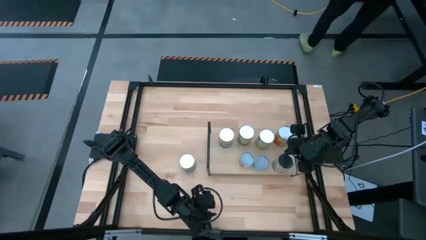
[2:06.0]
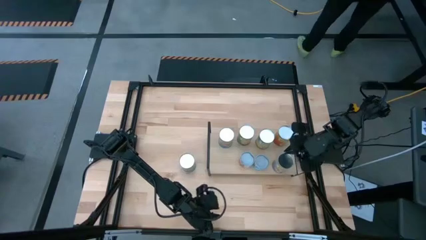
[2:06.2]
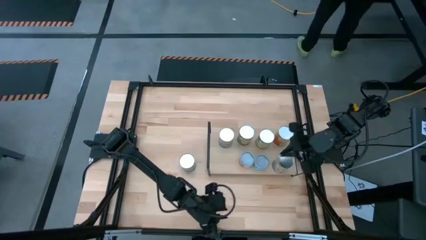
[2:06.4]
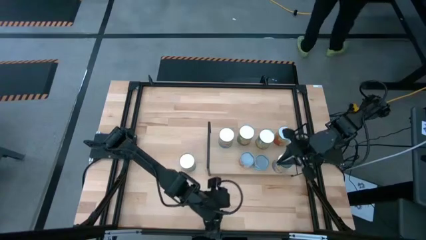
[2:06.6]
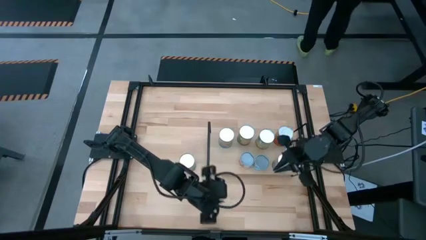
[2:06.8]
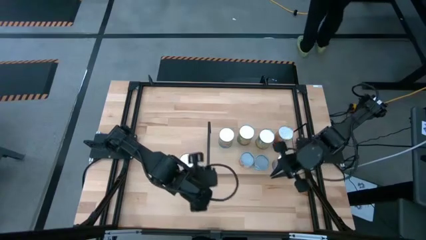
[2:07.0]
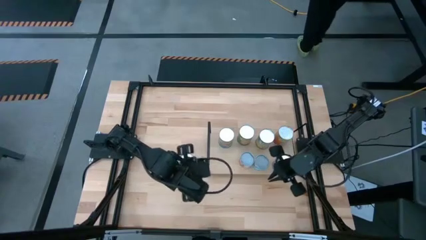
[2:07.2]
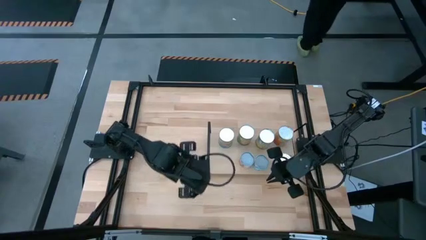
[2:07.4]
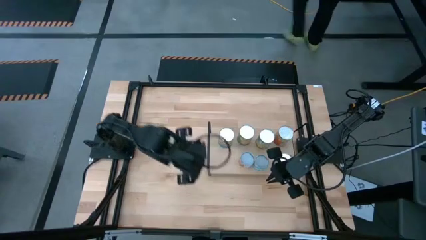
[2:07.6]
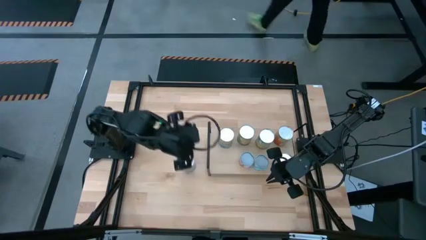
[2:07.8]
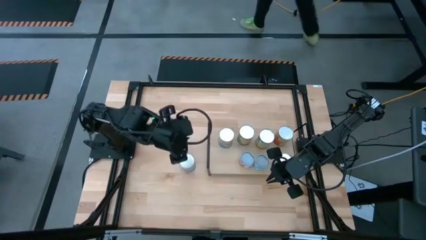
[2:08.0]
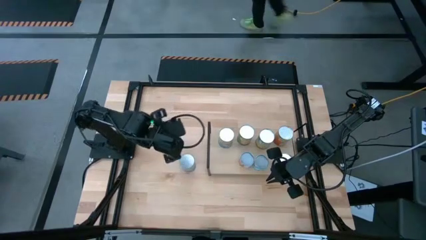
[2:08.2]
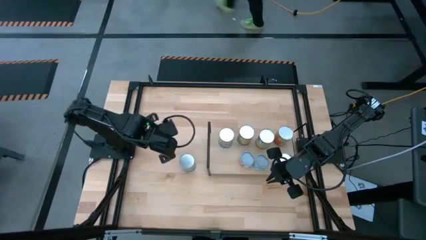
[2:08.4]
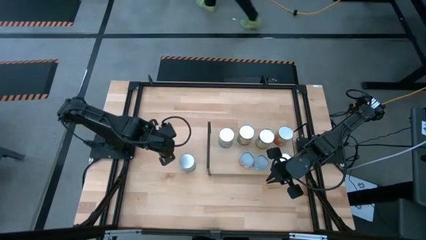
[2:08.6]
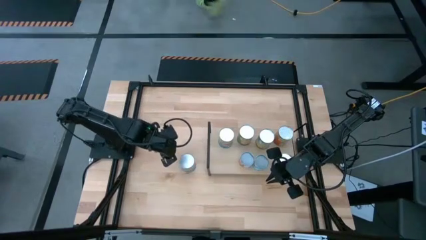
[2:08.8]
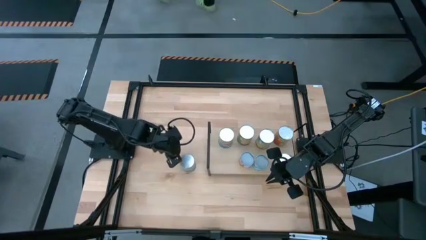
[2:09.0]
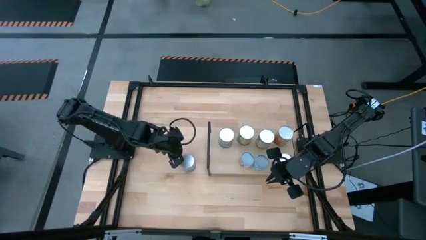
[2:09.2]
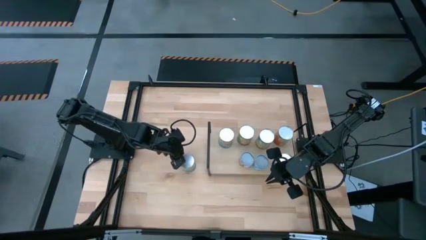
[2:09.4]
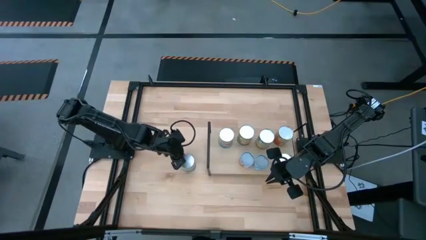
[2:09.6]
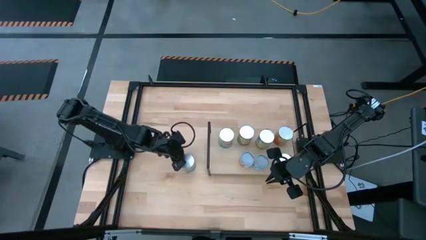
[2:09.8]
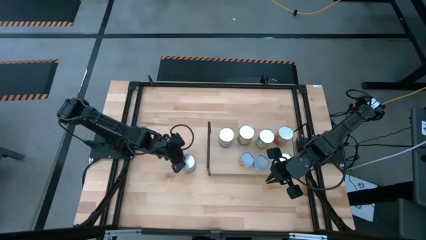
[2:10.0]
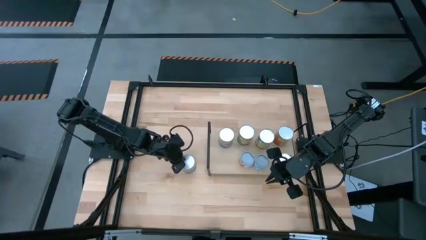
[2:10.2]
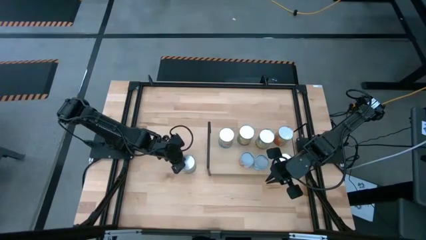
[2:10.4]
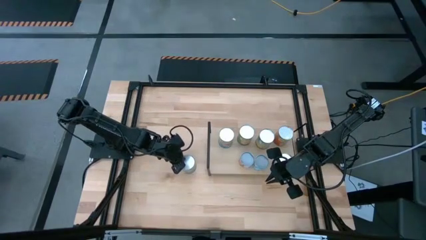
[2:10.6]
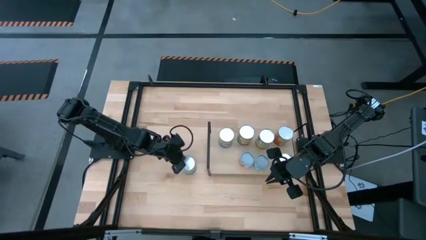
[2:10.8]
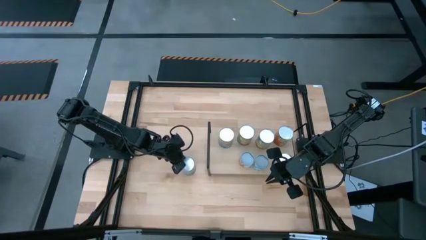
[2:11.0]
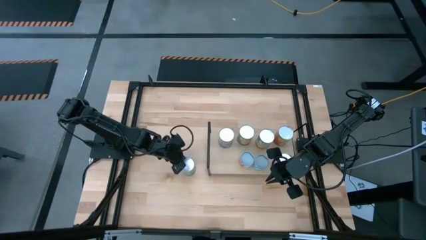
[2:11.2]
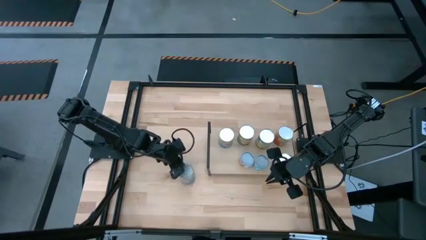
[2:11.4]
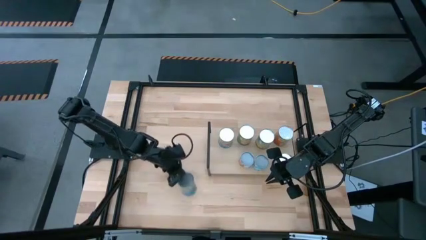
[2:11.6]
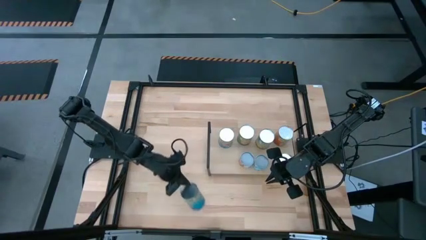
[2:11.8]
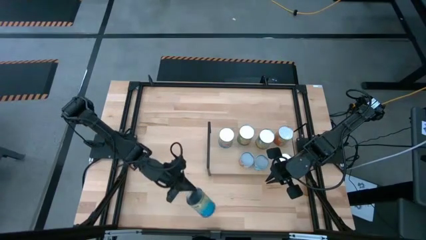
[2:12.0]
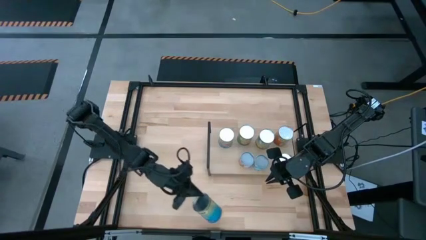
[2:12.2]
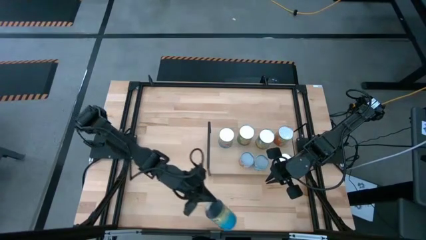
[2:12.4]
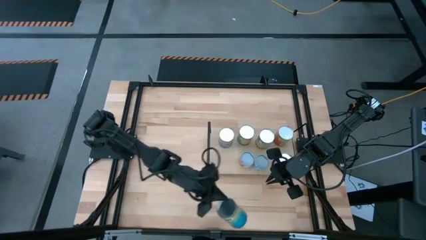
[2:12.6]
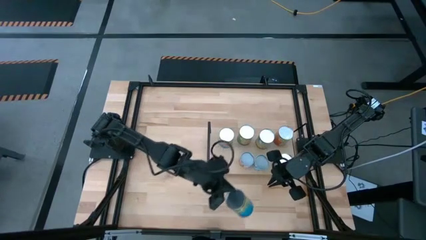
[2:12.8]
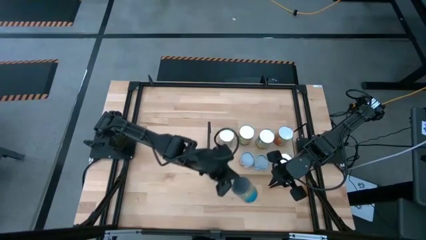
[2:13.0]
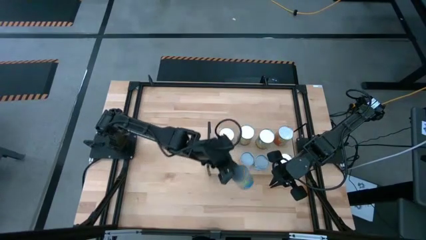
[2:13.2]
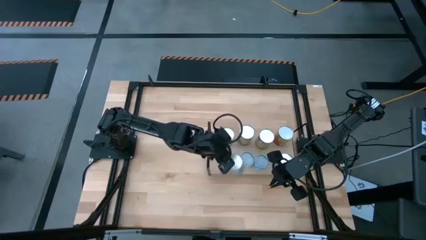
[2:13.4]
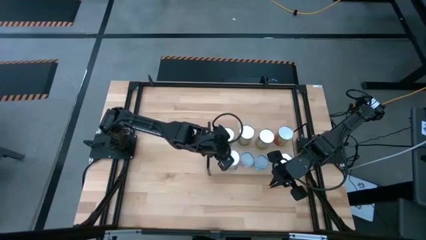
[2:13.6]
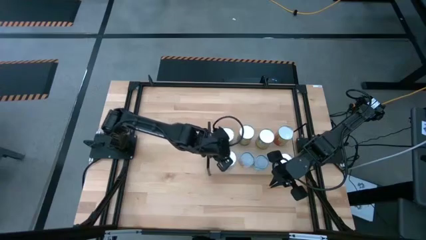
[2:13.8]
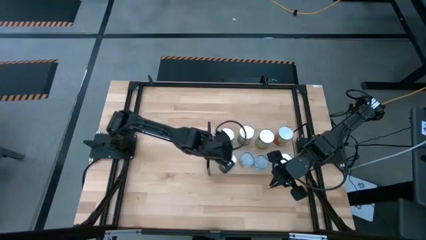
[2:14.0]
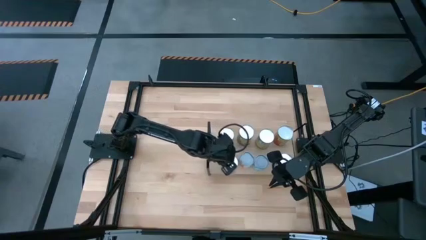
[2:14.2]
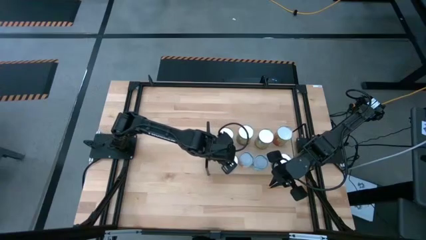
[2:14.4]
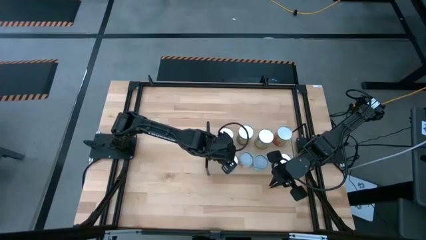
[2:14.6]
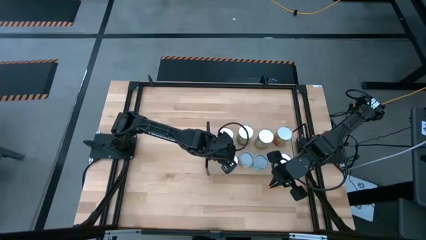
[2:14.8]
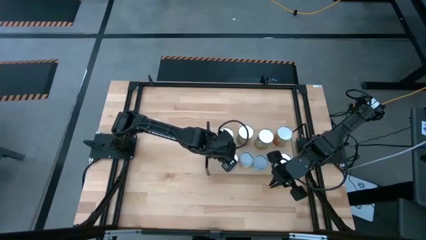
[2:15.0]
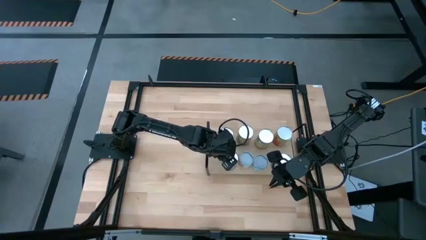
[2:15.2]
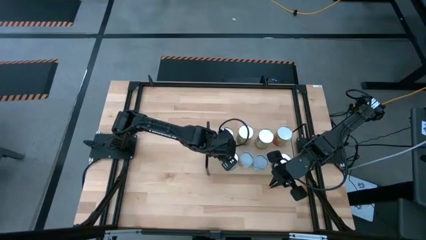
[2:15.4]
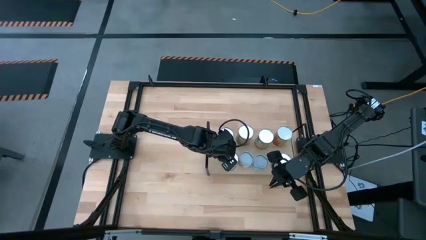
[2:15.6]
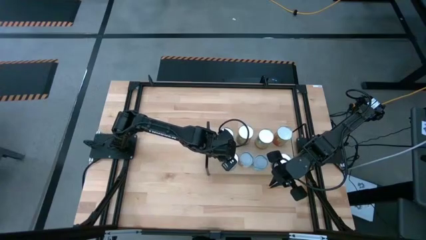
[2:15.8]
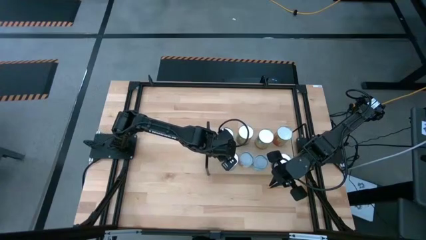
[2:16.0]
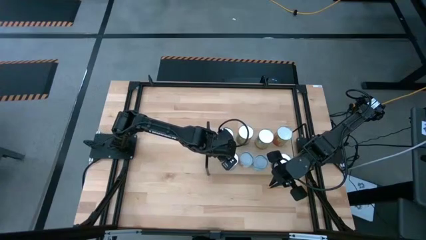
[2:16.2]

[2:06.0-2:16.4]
Task: Pick and place cans onto a shelf
Put the canned cherries on the shelf

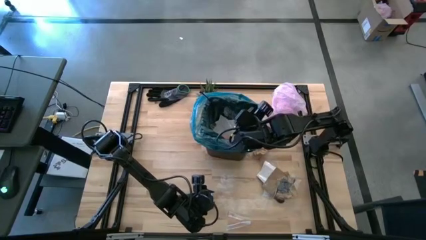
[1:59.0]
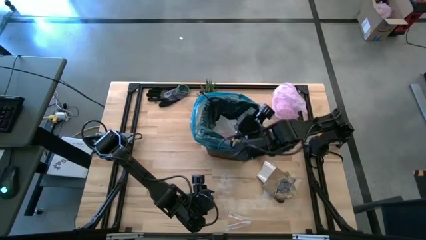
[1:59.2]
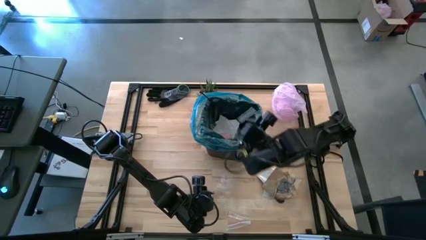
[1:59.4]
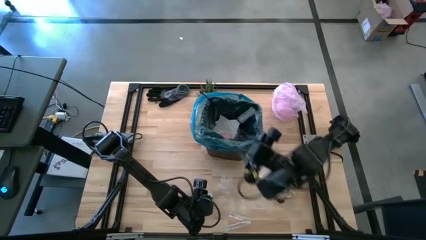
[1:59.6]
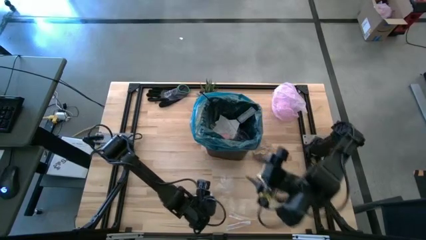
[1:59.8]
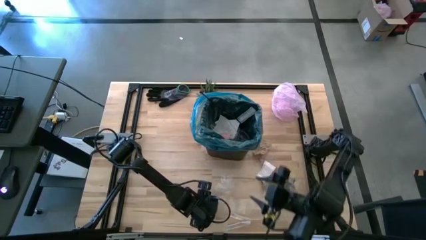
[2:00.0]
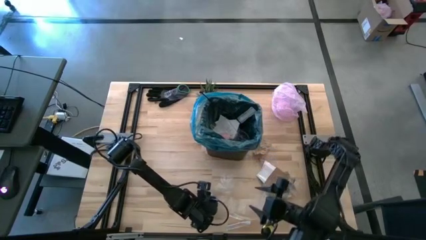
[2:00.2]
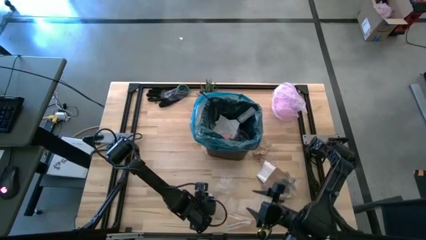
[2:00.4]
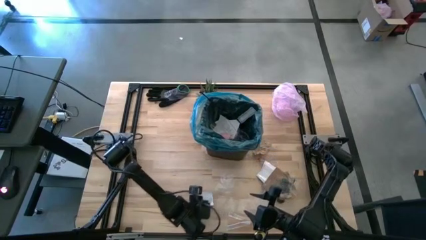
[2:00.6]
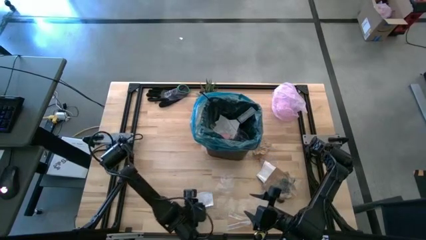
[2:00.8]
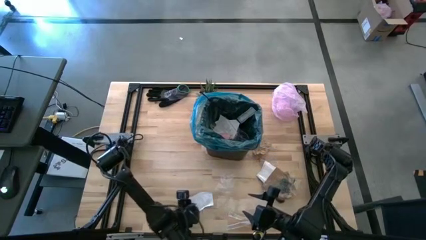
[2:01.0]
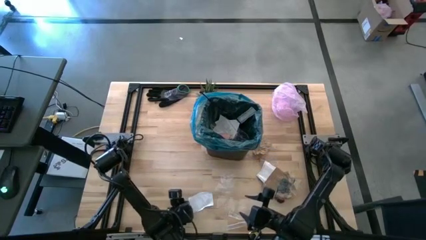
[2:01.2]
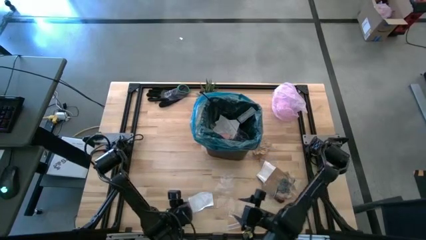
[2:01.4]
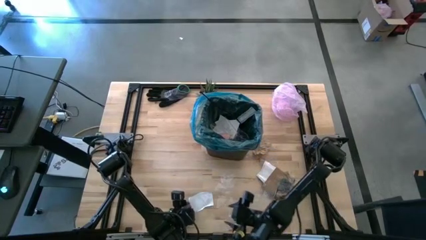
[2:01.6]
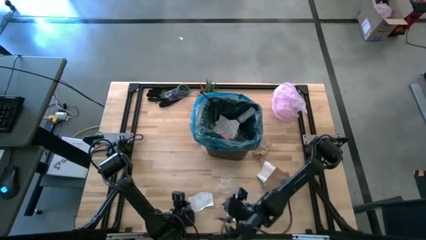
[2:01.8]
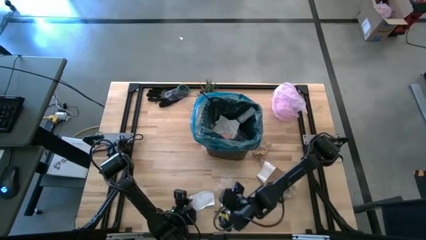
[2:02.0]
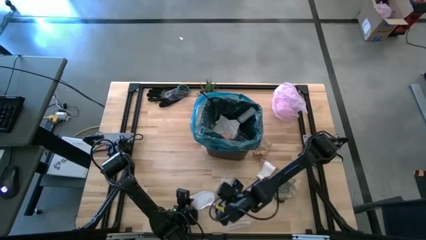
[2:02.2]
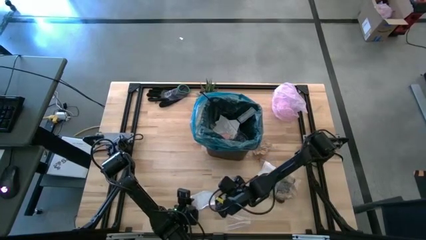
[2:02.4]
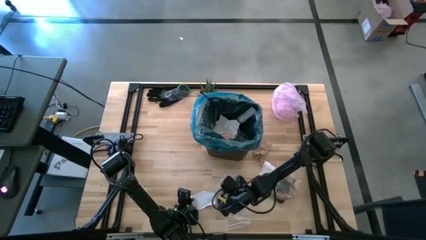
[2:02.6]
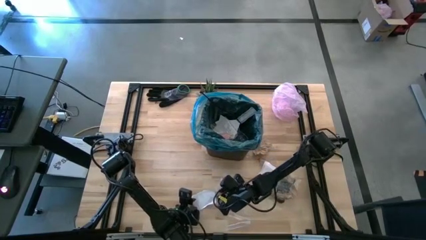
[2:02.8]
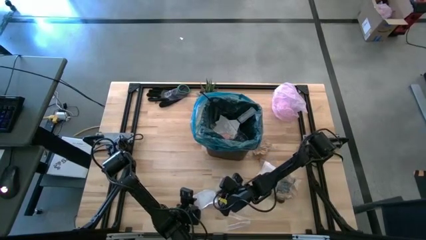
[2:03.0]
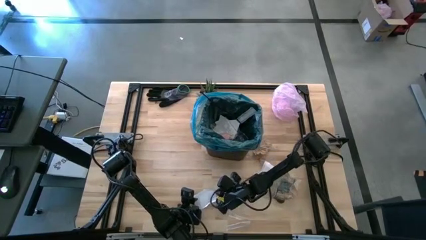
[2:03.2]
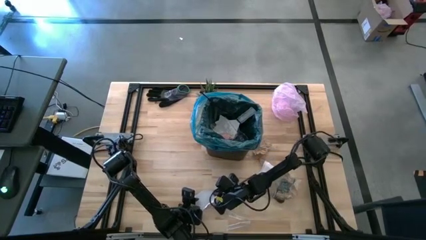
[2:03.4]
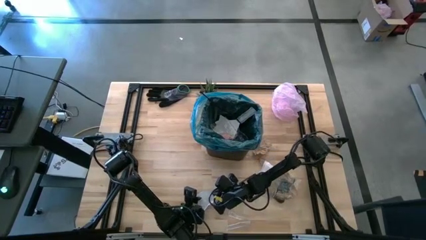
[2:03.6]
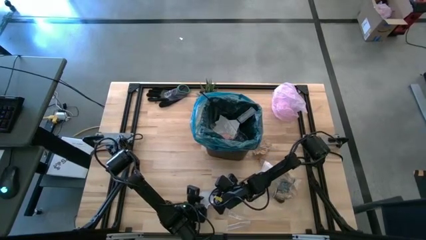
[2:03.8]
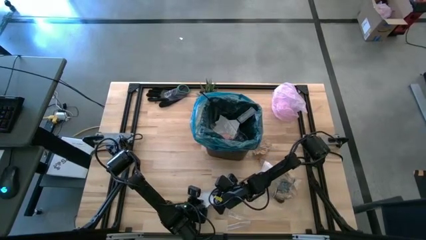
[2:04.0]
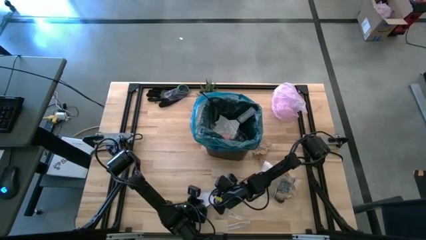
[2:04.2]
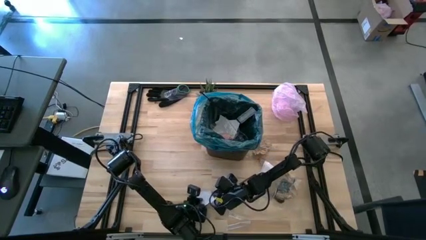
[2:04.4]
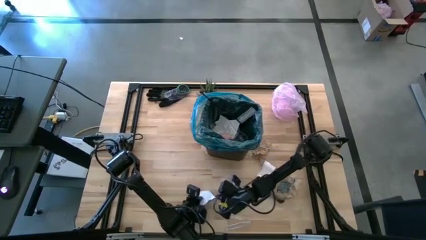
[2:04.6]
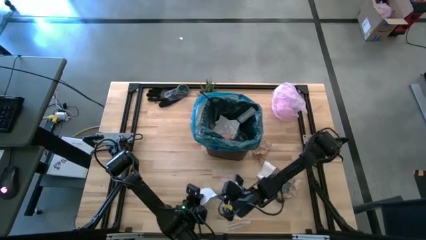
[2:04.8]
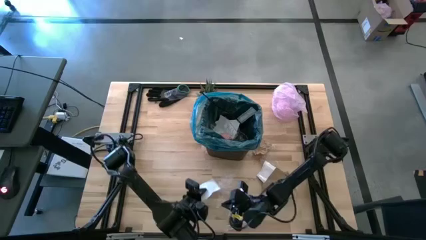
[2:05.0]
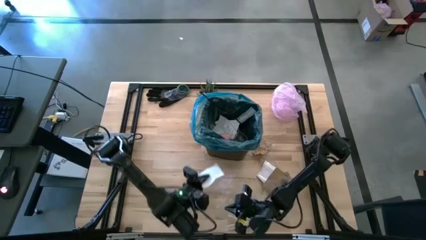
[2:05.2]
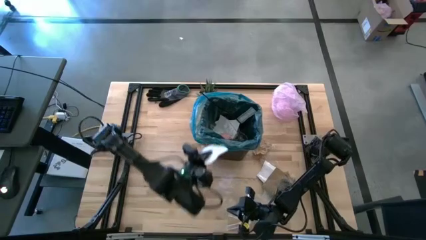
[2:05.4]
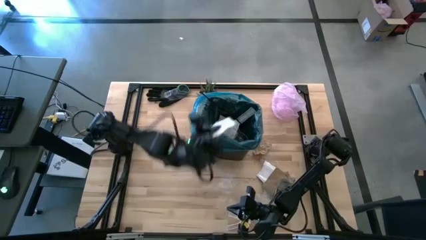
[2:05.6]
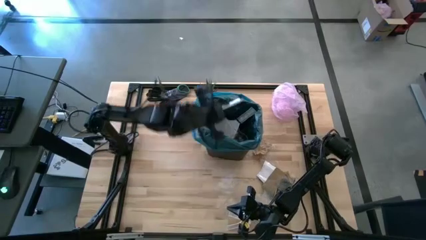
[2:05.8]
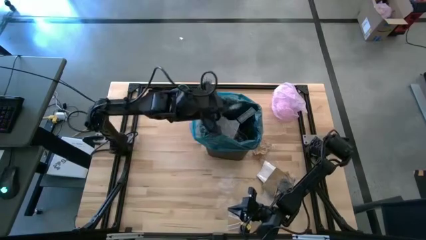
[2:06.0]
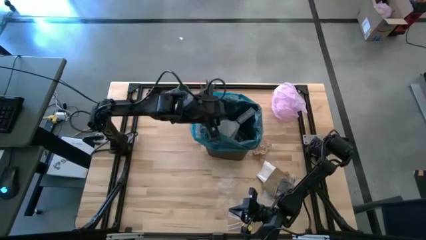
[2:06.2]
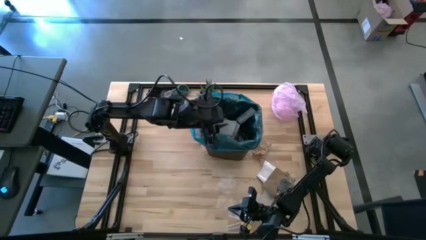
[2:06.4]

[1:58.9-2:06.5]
Task: place trash/remove bag and relplace
Put the white paper into the trash bin
